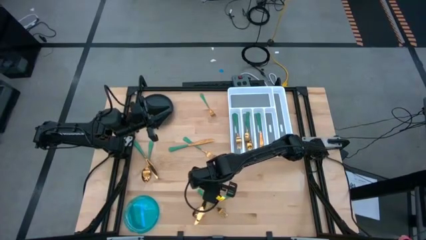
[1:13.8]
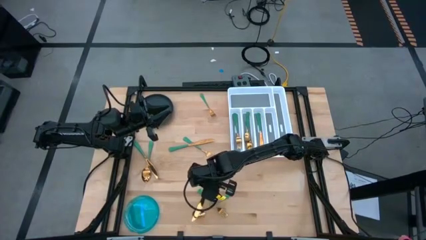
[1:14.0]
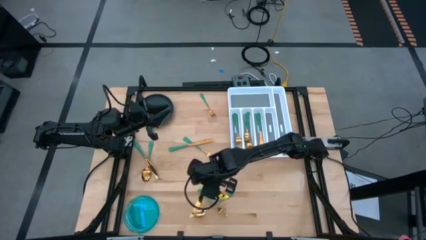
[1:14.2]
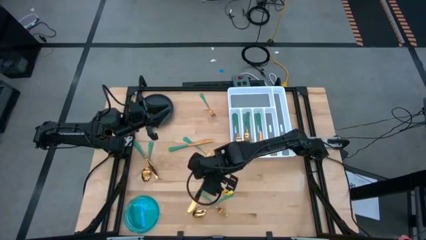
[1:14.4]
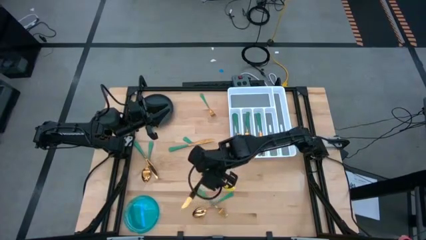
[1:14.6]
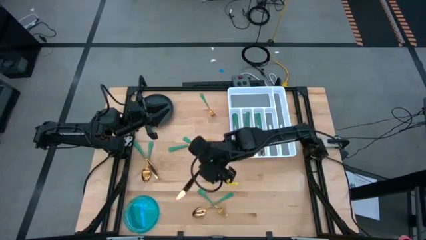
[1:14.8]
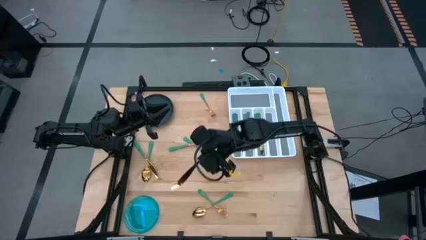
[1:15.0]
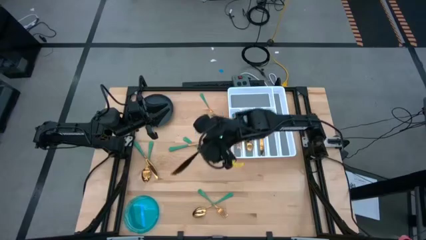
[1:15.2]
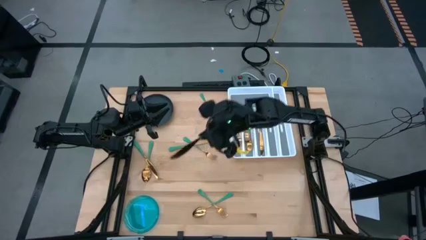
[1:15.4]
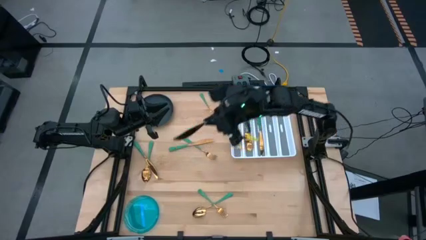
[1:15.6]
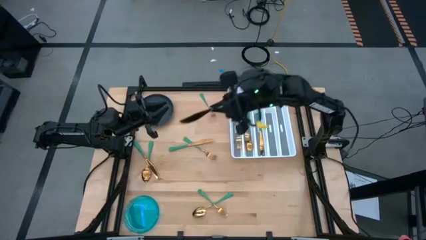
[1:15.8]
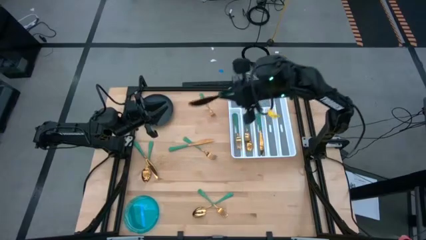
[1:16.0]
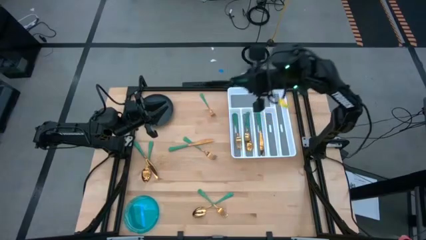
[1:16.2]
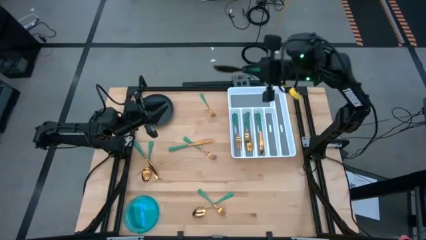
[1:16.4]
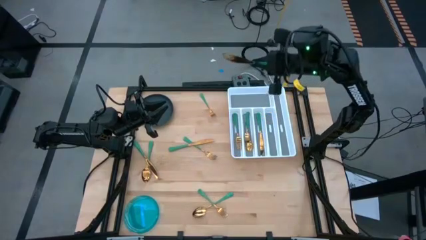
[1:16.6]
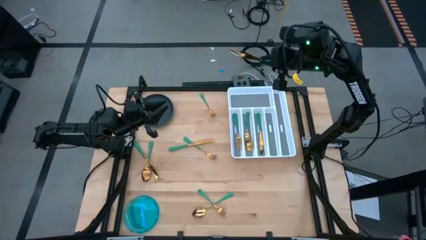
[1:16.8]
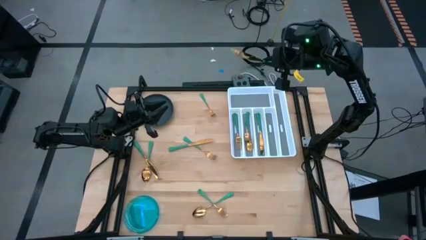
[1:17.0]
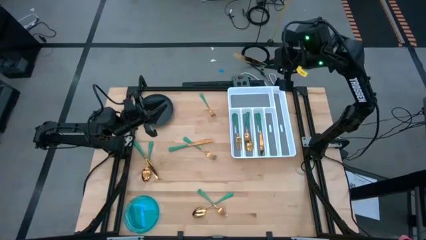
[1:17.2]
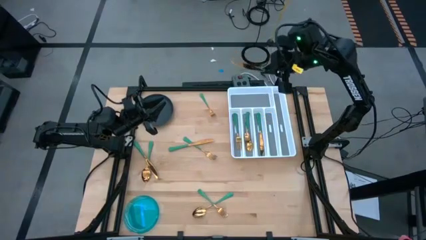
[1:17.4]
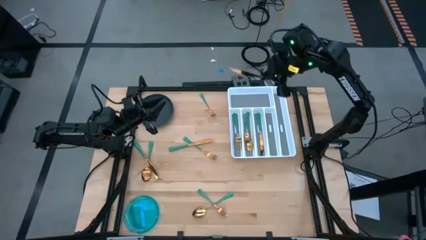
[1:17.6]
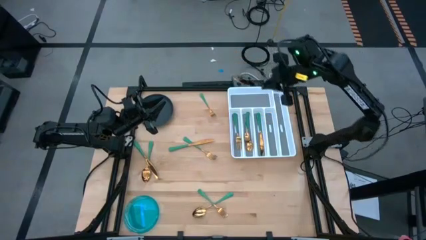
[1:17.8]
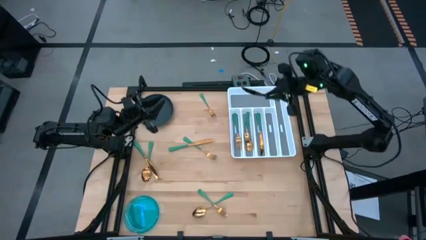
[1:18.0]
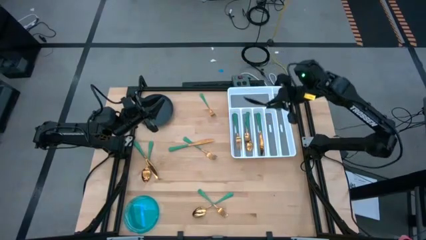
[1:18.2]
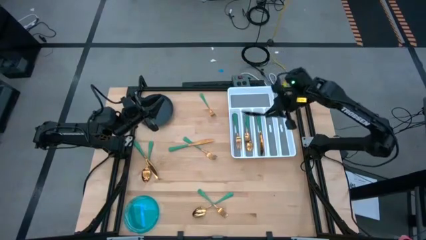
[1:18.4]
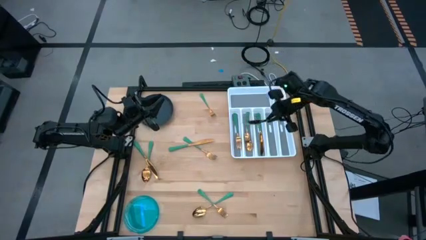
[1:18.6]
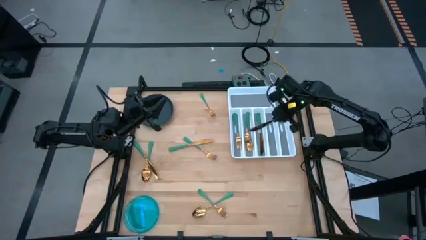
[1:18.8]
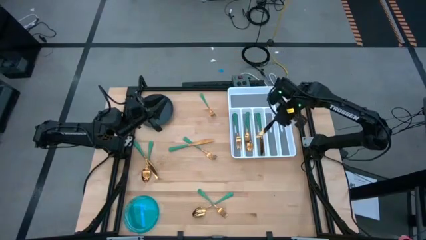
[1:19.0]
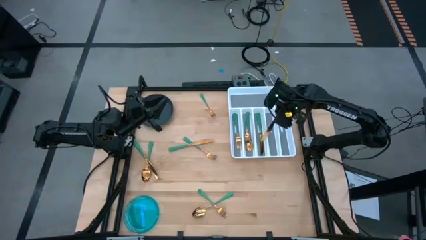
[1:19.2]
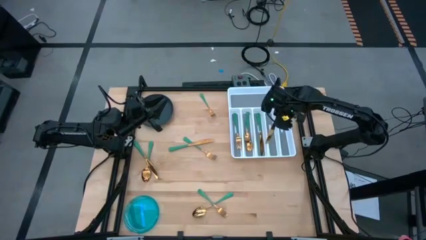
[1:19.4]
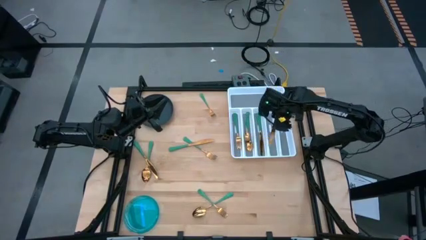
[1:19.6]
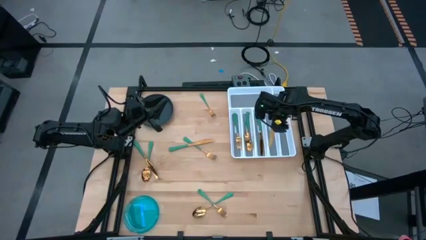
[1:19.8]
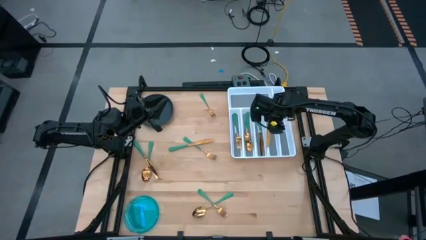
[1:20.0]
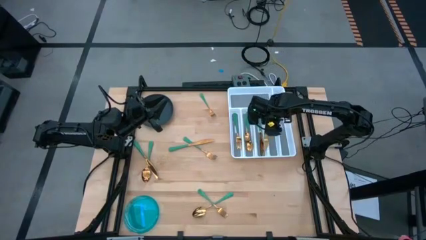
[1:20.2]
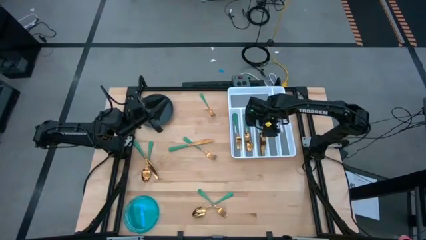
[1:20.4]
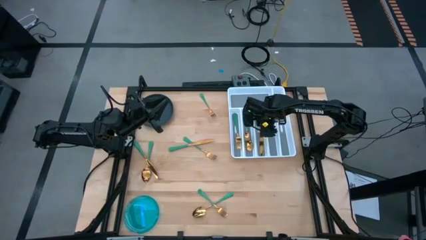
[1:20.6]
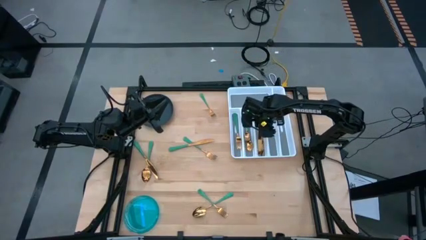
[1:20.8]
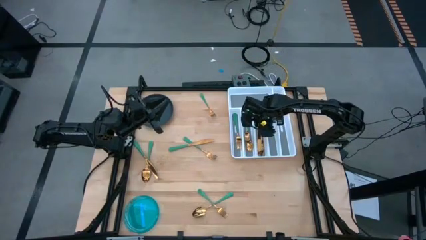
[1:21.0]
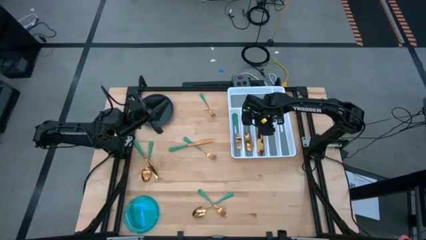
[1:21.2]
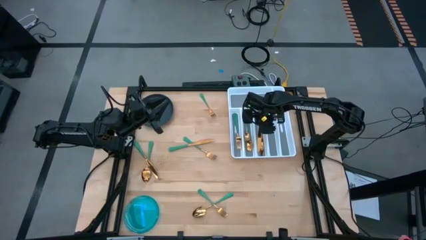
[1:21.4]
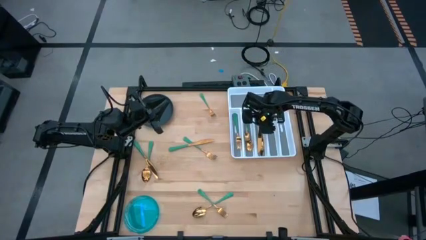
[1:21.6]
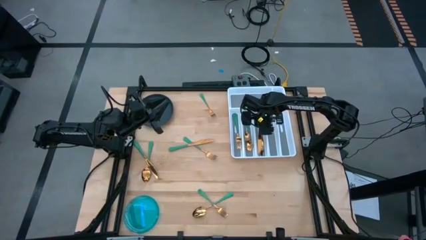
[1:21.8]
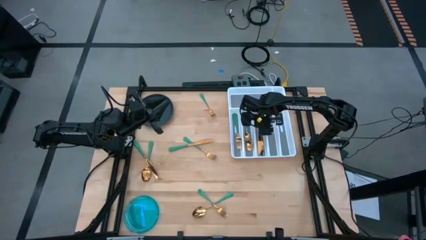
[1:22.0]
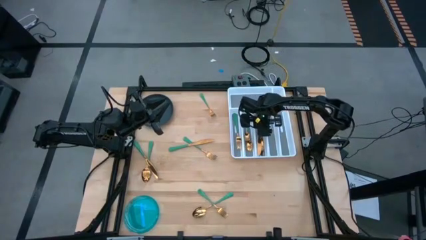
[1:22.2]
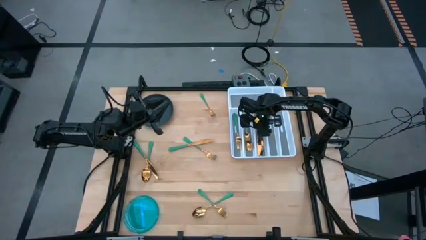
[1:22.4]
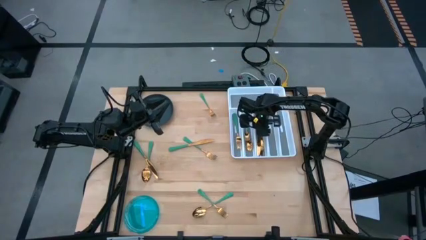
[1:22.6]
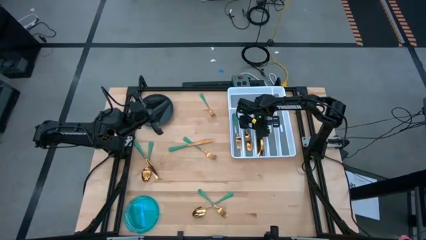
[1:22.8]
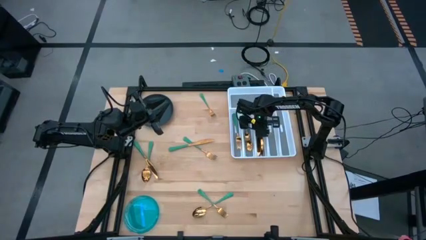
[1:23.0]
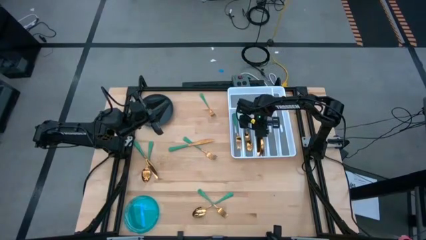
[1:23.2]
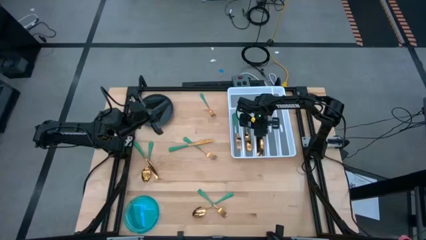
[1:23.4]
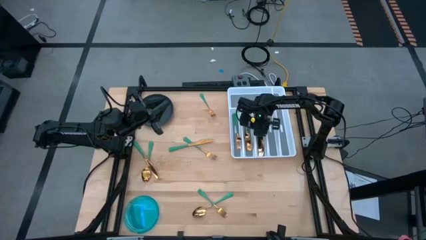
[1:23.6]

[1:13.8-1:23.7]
Task: Sort silverware
Put the green knife into the white silverware organizer

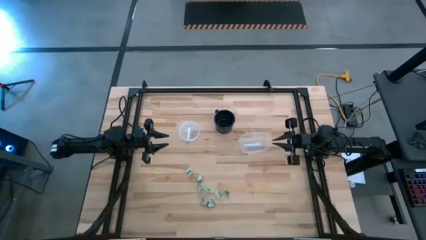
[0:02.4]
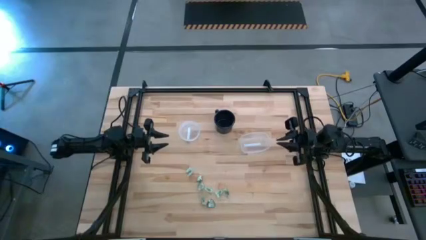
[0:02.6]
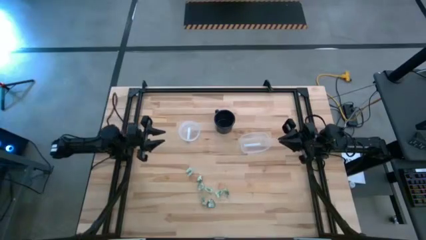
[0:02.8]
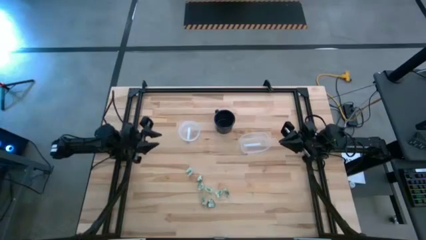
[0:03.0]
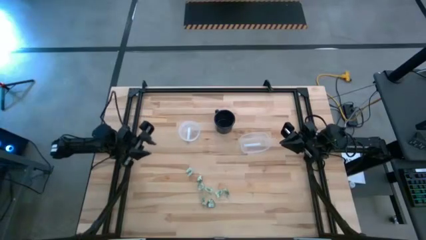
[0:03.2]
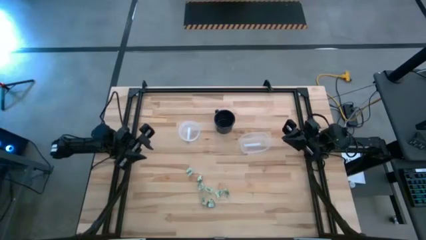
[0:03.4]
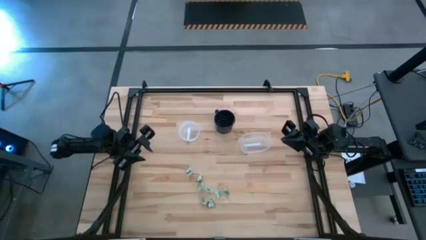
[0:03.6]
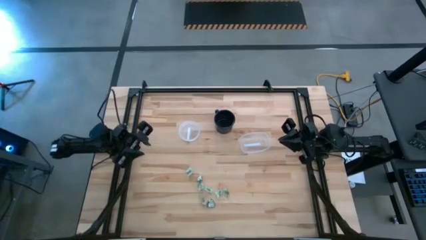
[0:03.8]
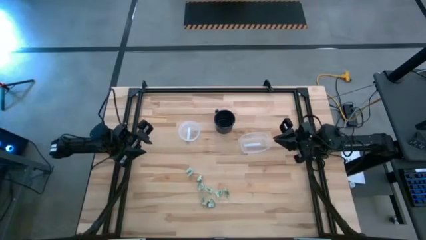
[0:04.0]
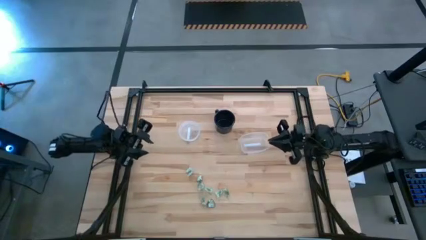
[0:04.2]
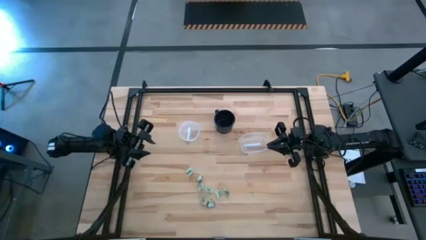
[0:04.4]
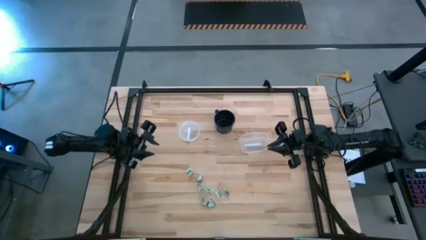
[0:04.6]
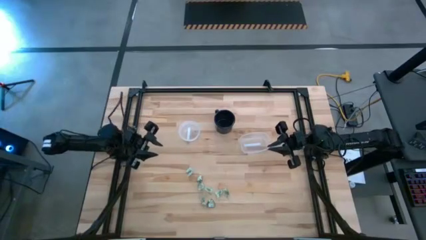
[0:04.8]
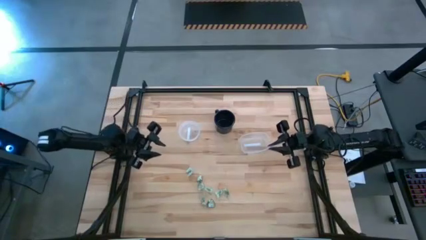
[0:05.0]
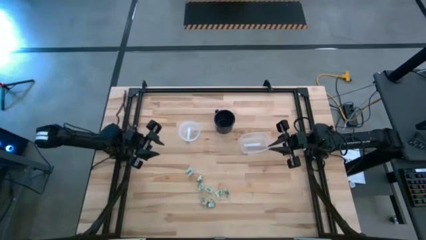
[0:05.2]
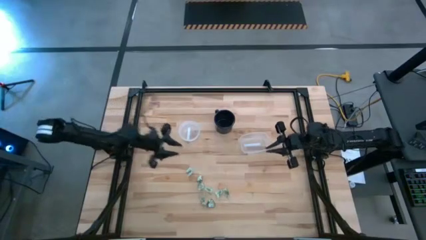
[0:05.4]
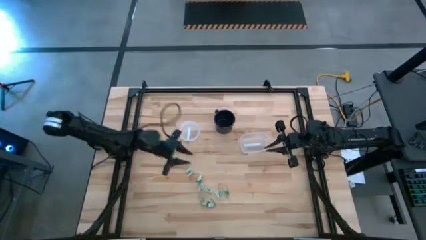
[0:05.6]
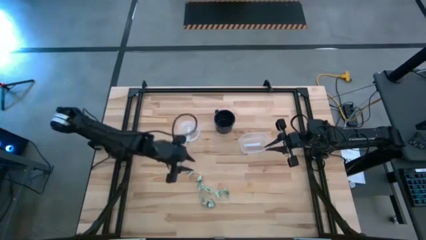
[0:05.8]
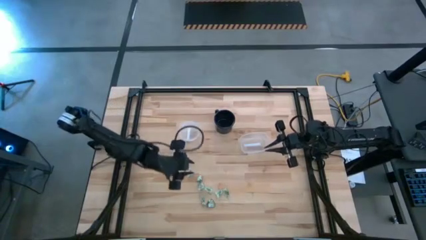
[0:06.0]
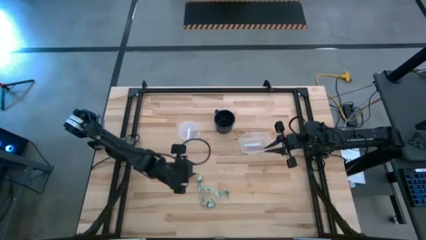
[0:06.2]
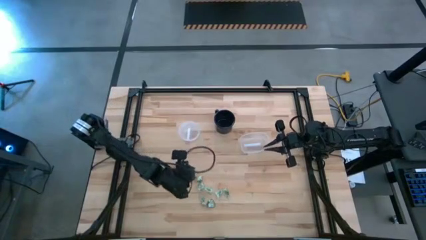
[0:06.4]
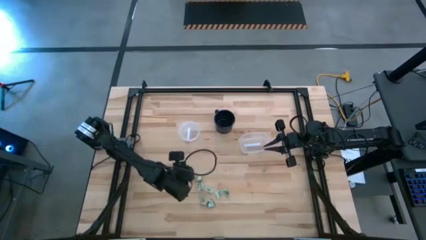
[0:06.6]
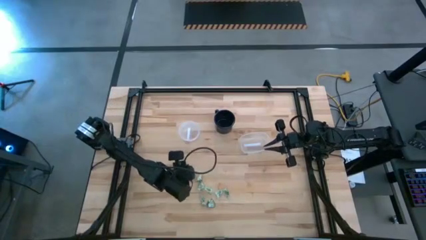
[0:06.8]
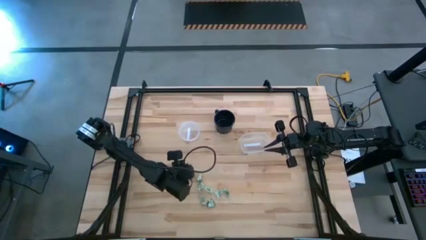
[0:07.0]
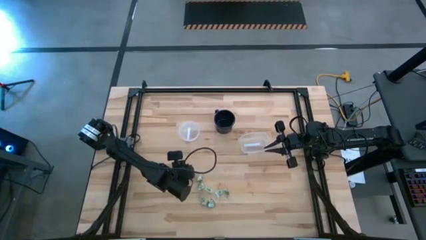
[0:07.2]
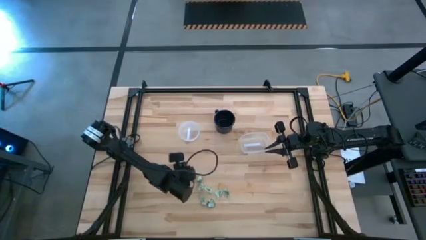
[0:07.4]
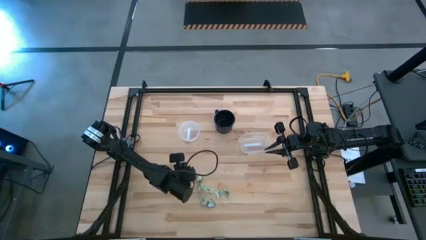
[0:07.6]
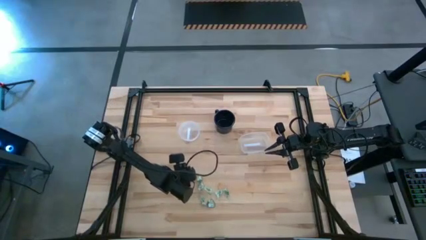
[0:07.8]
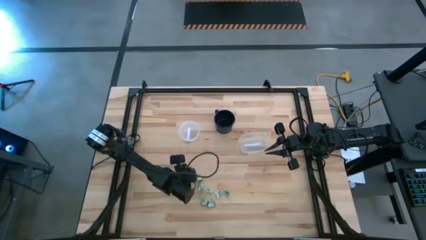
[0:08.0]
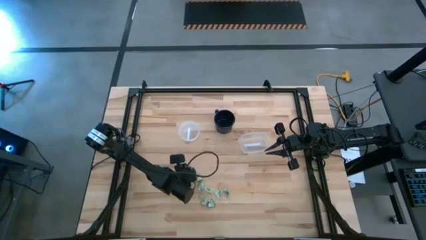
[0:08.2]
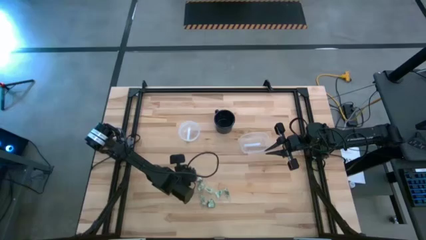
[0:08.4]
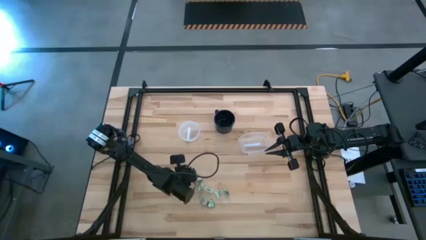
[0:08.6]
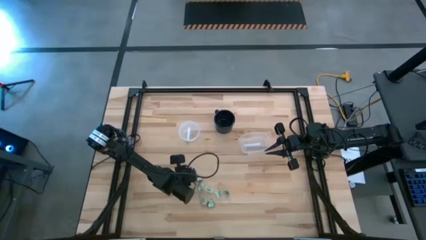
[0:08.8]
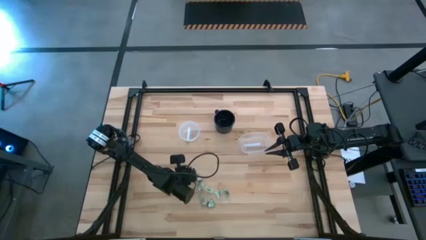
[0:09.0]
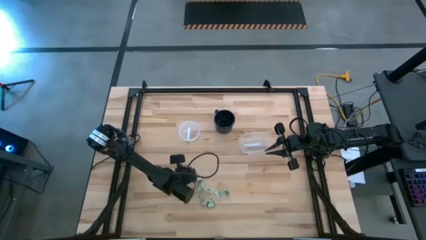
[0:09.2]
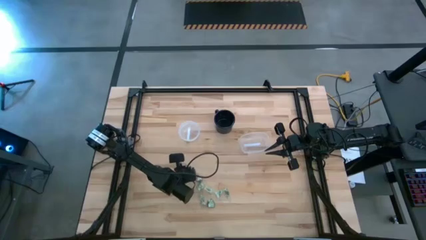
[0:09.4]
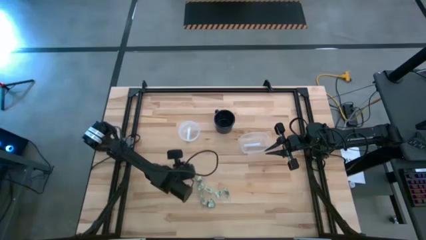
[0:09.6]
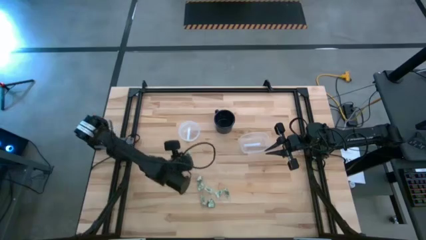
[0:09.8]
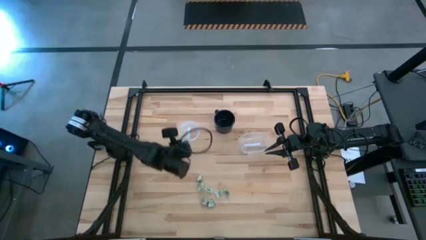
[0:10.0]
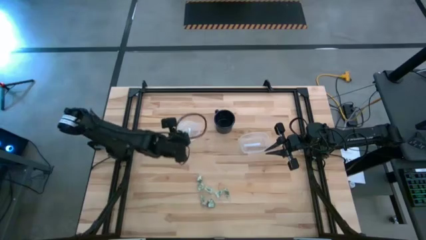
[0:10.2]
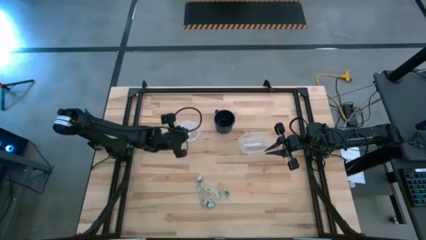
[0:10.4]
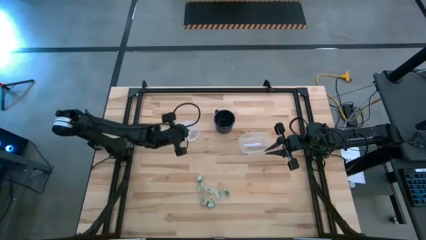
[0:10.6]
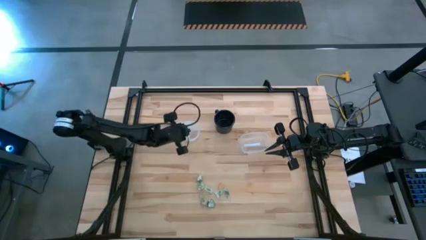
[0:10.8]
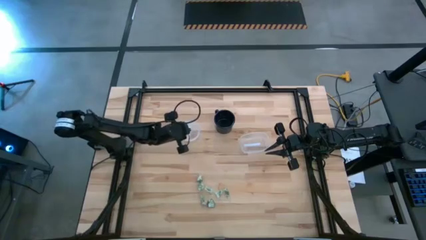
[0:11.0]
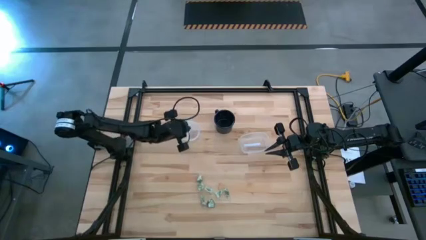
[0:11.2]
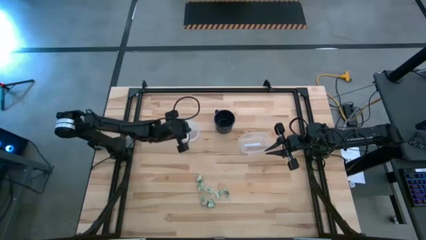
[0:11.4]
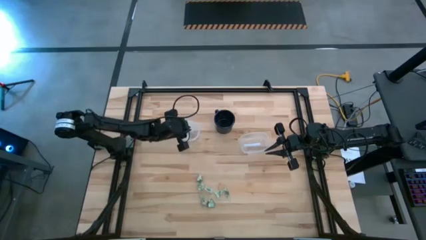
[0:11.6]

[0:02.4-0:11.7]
Task: Pick and place items into bin
Put the stevia packet into the left transparent bin
